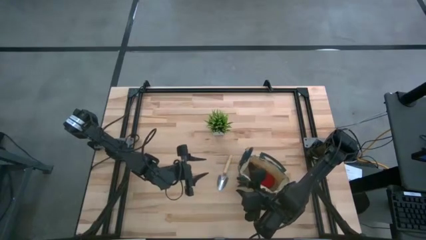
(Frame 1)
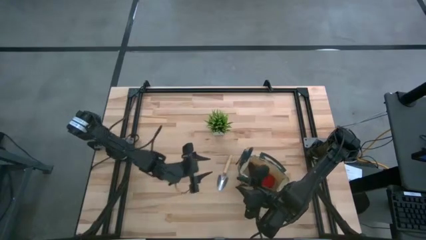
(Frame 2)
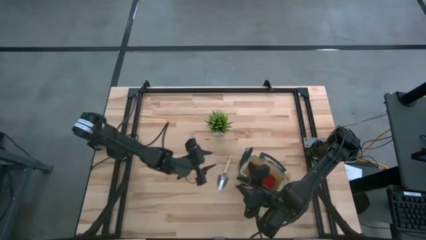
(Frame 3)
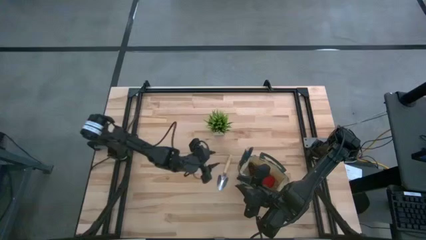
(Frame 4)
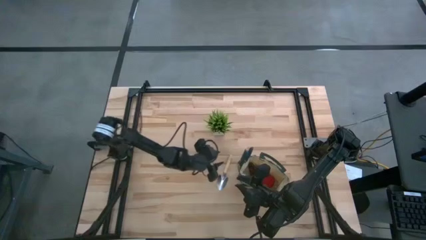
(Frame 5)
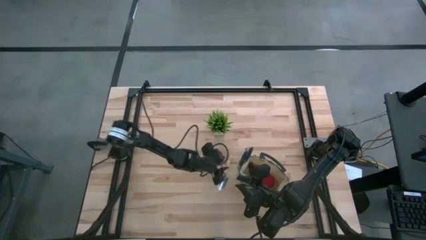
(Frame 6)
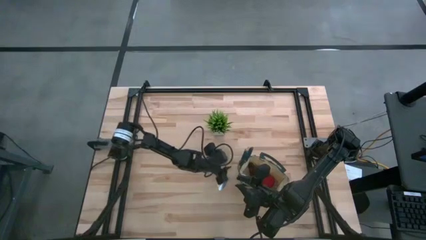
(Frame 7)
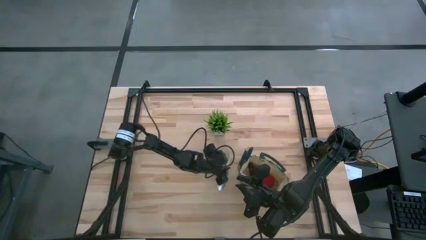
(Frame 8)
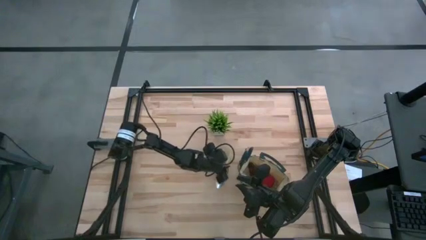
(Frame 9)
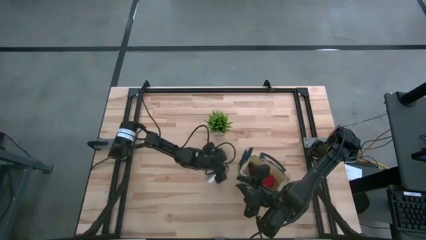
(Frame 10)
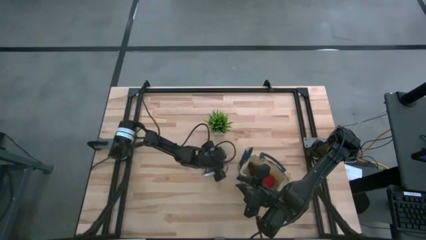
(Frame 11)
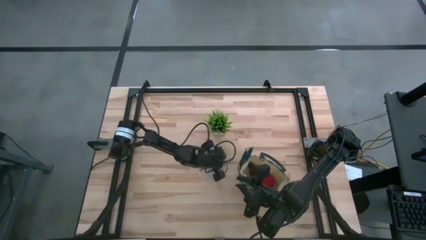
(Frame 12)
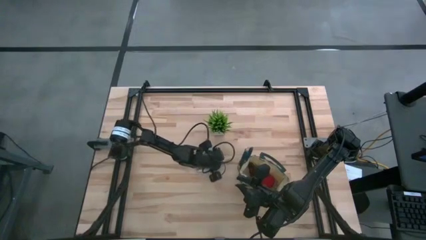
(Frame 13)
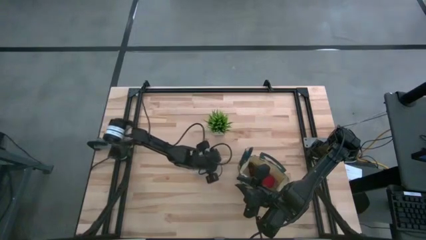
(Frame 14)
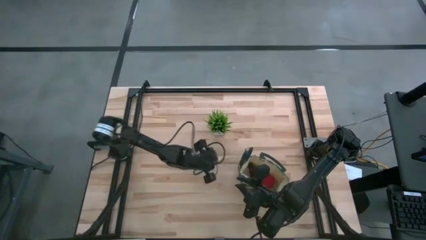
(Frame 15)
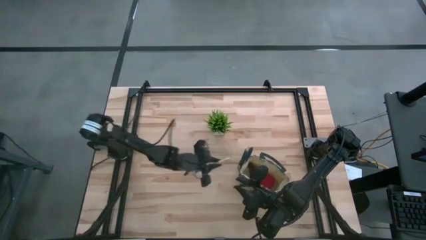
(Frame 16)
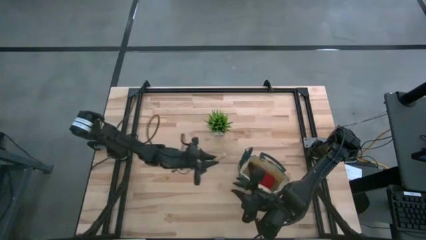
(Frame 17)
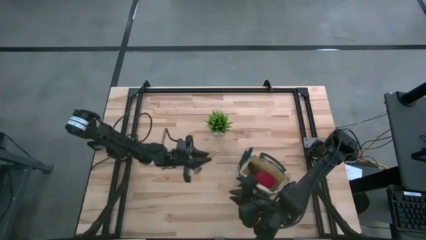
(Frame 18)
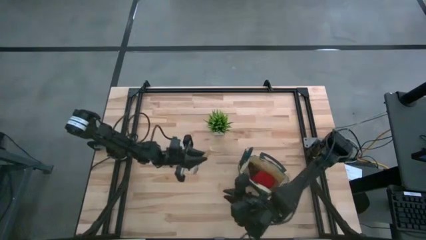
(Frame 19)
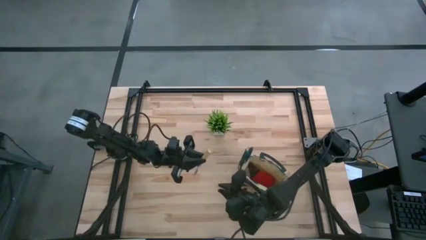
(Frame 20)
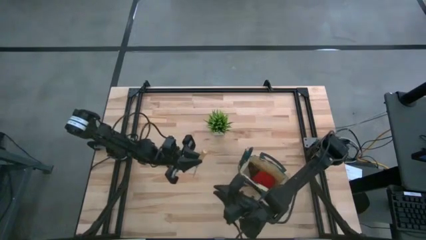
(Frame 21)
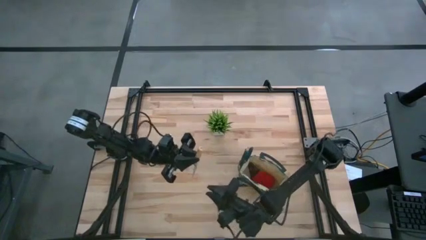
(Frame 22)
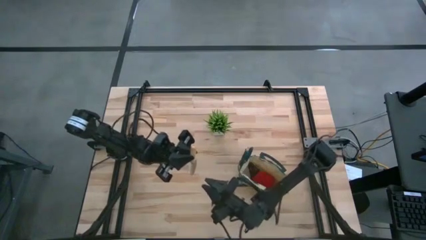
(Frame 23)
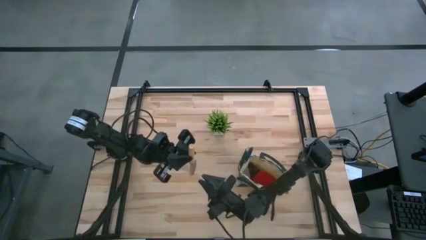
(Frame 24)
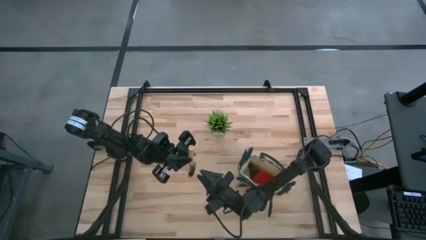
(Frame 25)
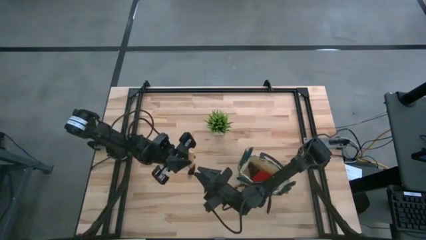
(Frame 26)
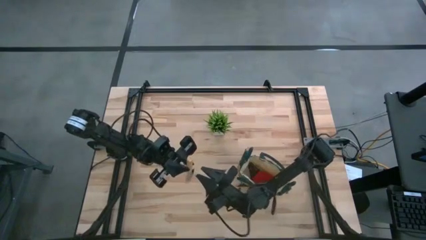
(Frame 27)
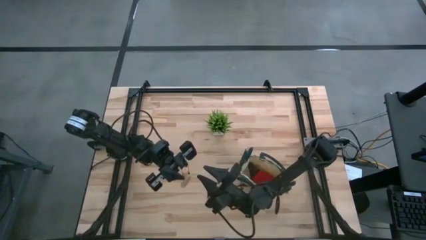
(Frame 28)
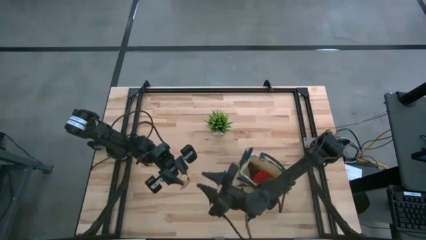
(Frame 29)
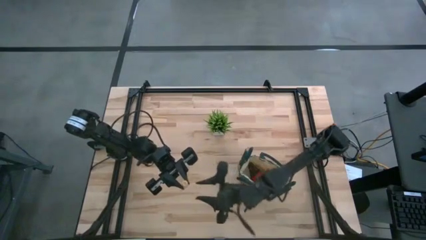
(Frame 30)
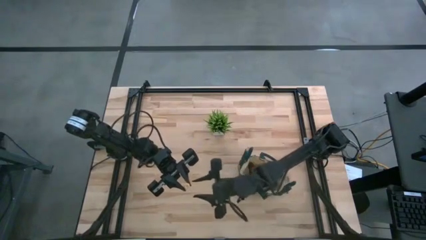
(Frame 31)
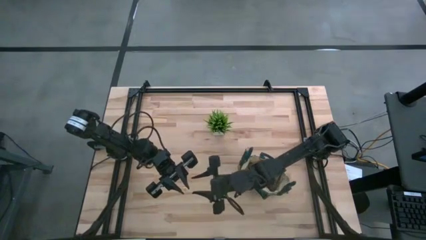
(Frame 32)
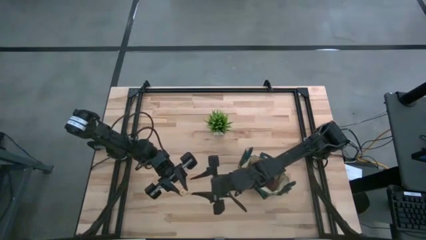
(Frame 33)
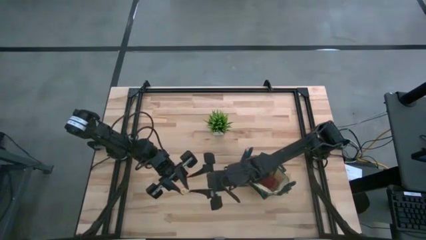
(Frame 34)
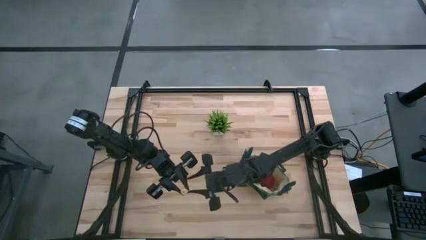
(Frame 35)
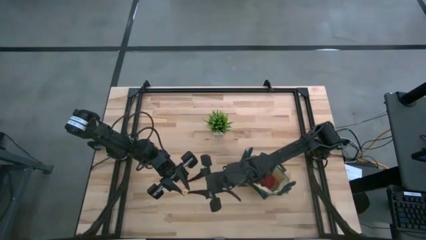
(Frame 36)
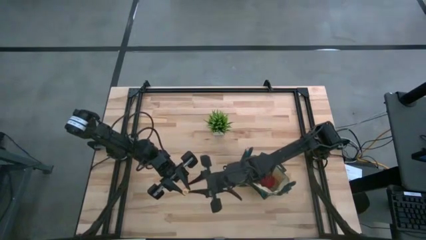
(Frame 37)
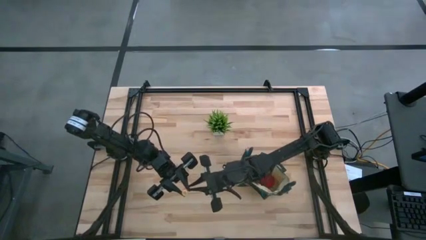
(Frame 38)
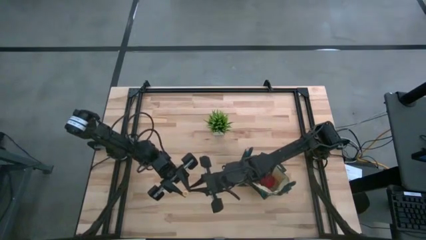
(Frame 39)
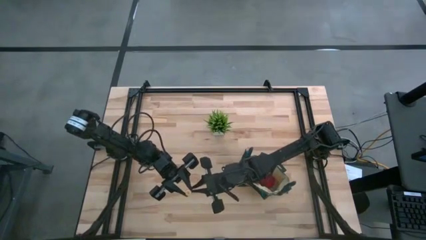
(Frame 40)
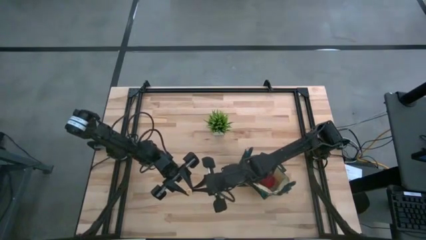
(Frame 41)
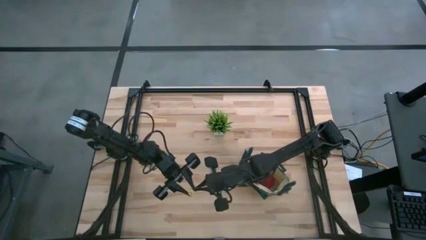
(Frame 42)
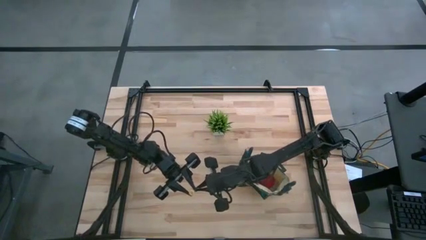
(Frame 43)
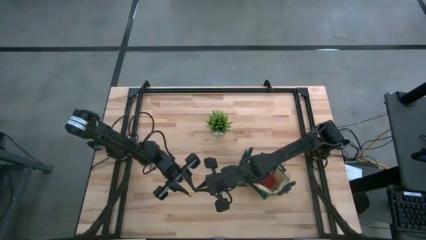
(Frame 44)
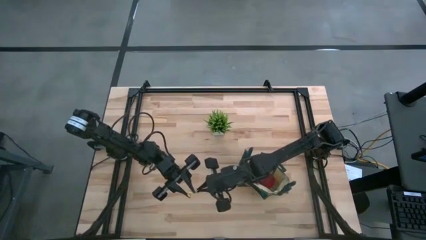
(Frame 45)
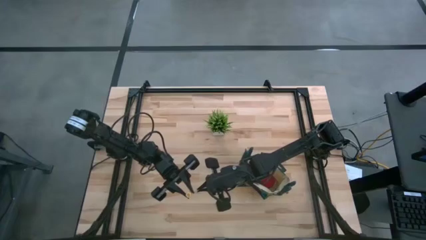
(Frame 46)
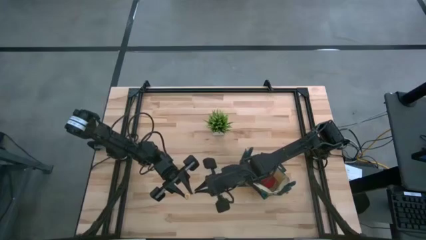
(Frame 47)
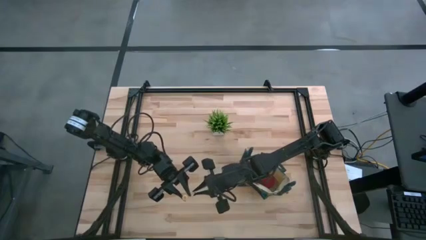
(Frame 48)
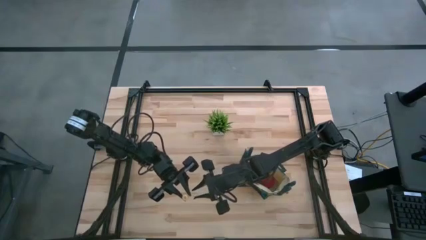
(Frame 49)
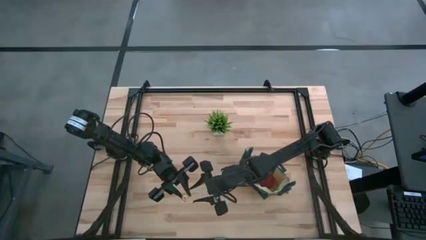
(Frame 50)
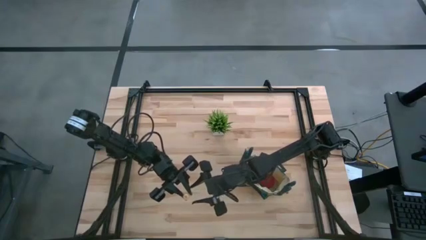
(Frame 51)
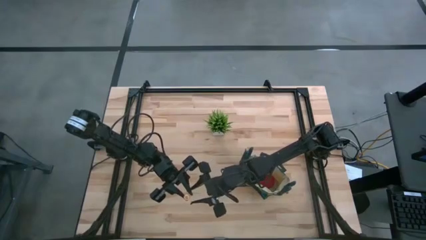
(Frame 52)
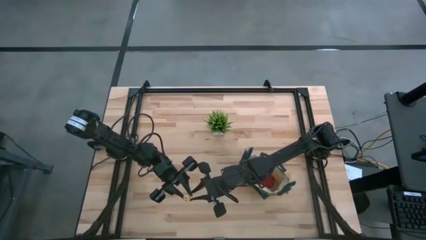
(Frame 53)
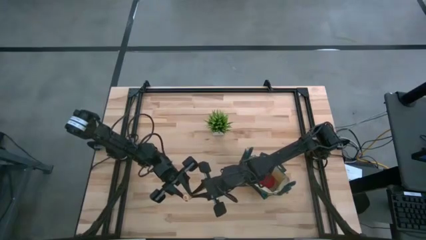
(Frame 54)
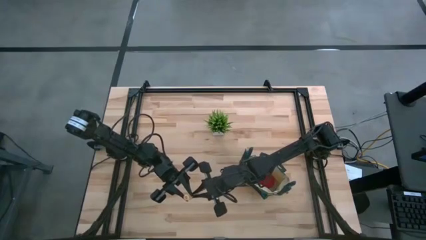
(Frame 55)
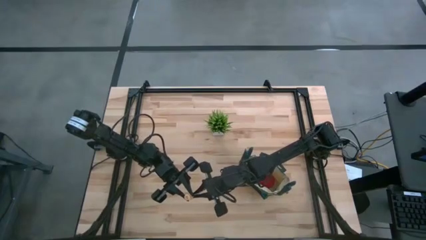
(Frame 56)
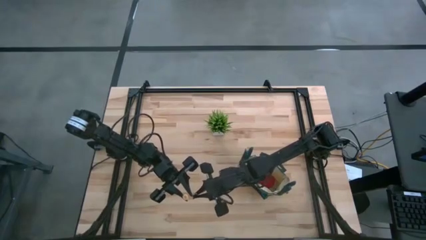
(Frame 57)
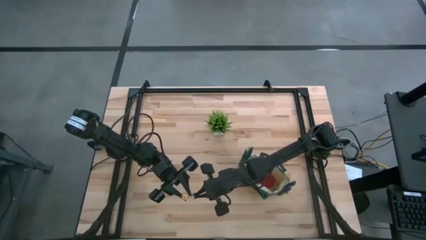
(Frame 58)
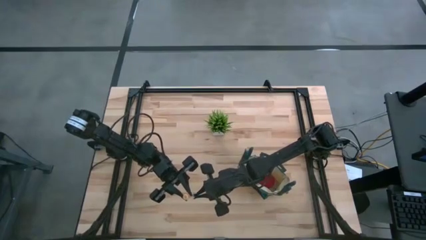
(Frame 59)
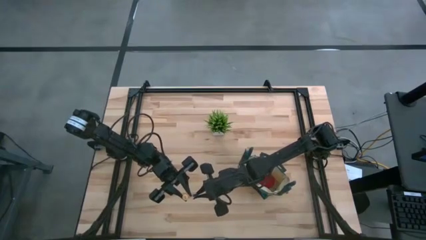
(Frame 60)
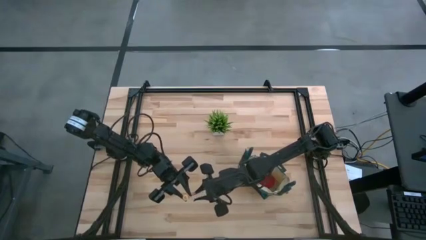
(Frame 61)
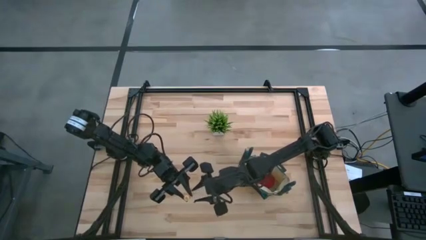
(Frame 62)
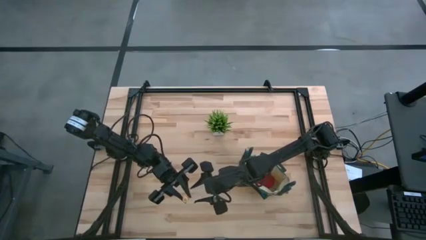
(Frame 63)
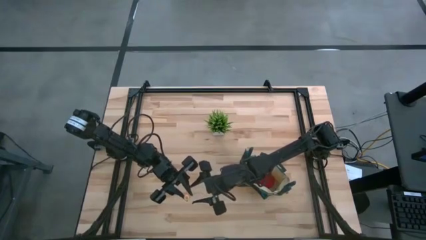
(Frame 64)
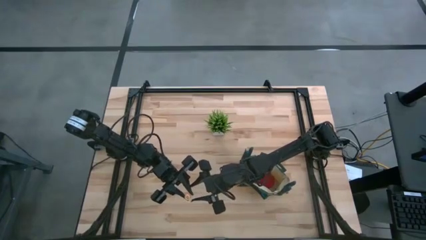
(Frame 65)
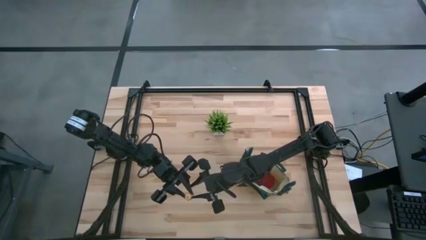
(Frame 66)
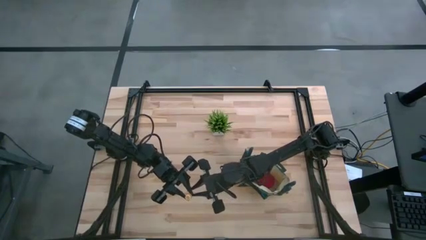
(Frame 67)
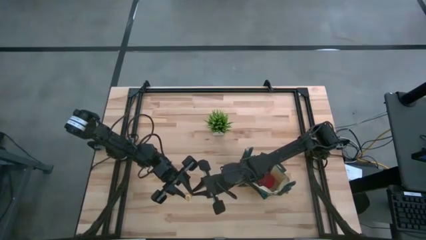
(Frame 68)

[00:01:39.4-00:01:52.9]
Task: Pick & Place Garden tools in Gardening bag
Put the brown trowel into the green gardening bag

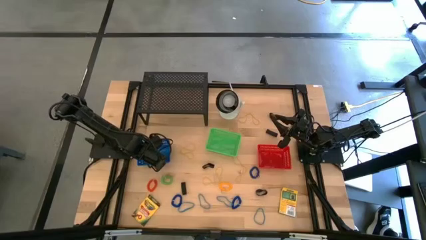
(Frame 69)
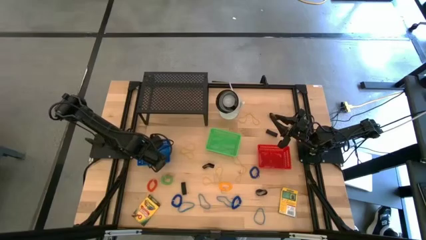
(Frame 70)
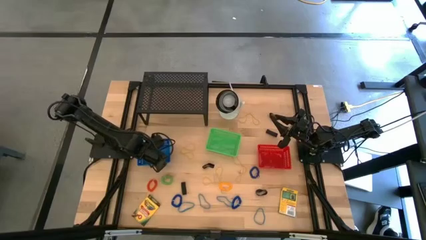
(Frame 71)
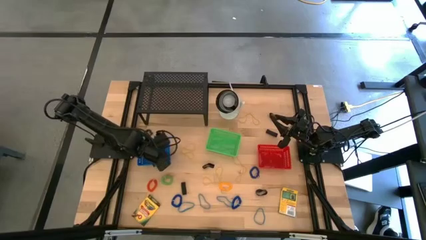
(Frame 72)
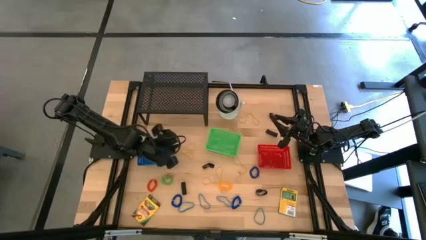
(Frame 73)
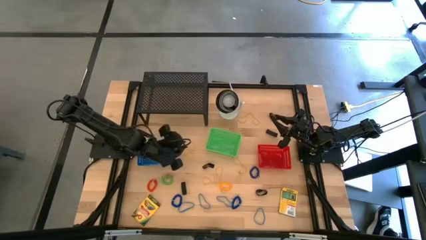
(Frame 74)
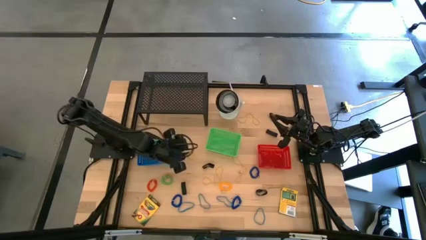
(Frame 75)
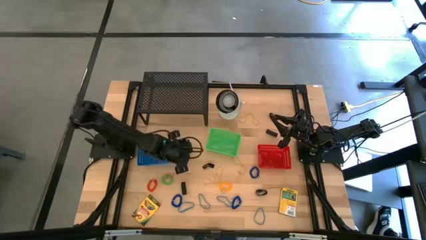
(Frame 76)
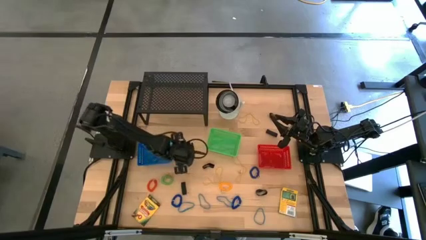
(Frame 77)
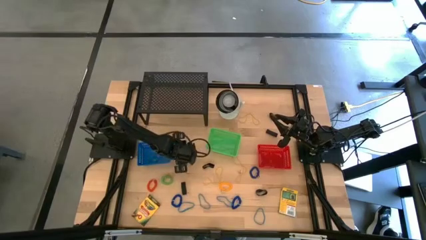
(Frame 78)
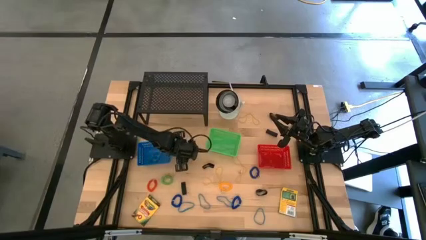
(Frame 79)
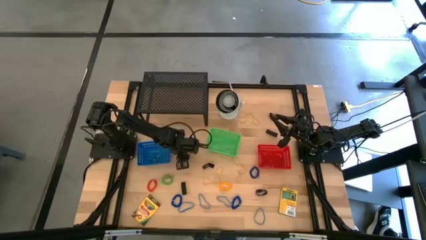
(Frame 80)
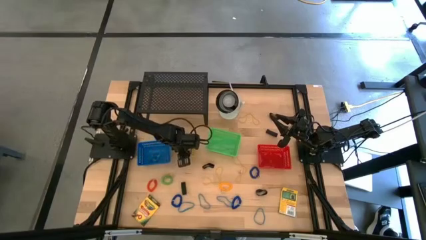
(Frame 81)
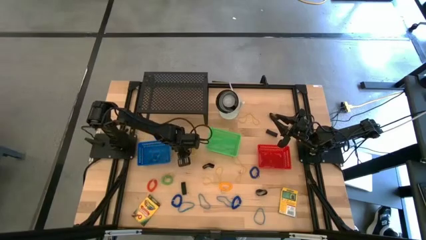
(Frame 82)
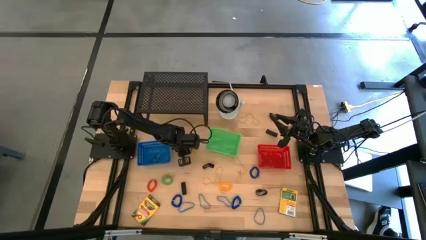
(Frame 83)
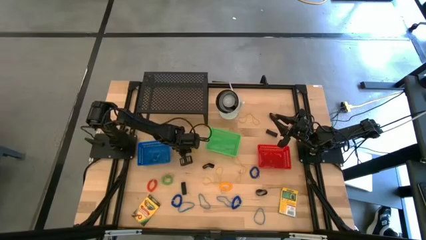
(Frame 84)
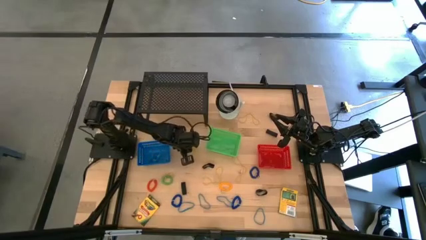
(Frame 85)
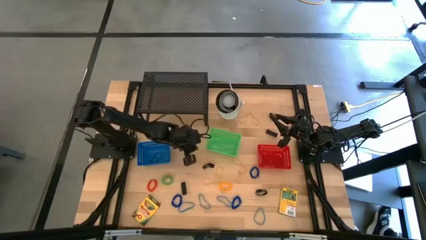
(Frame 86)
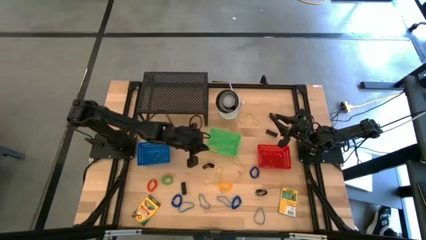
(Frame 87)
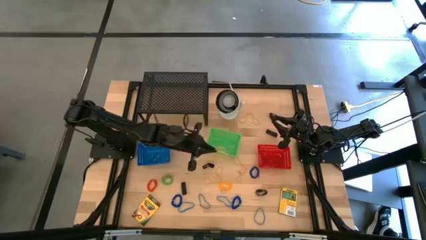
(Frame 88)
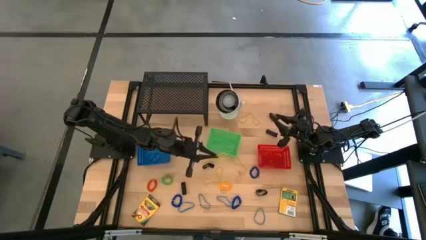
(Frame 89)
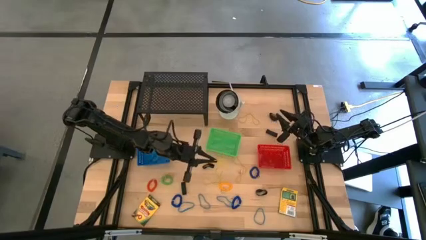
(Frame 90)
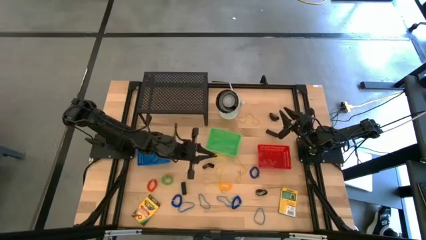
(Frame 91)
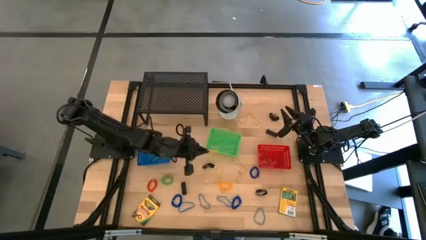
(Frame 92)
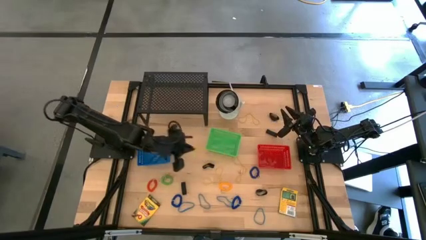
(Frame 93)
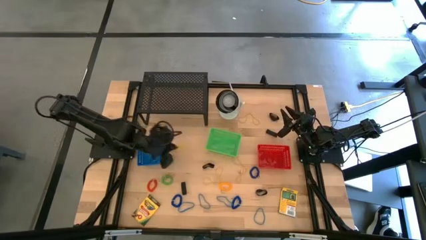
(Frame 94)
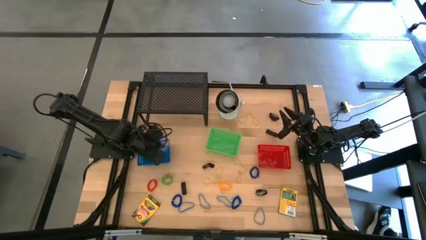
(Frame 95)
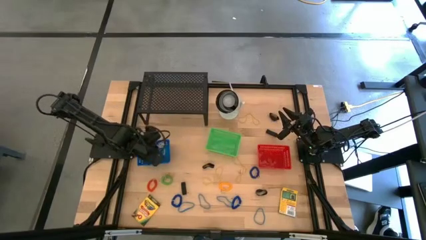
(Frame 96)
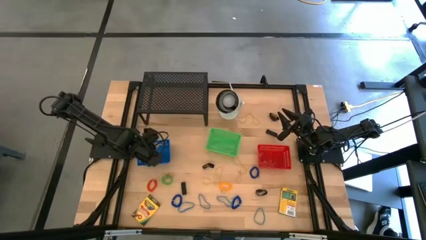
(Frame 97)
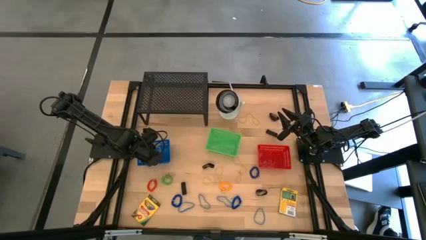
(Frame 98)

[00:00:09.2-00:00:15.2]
Task: Pick & Place Office Desk Supplies
Put the yellow rubber band into the blue bin
